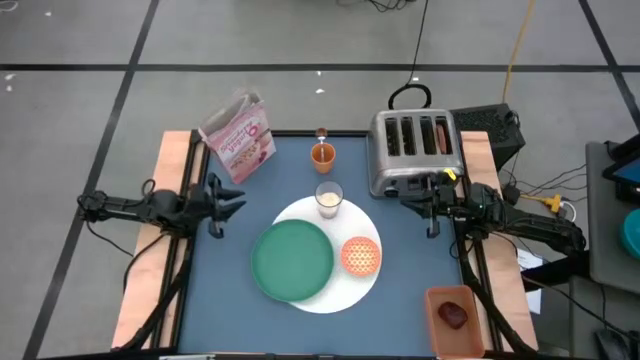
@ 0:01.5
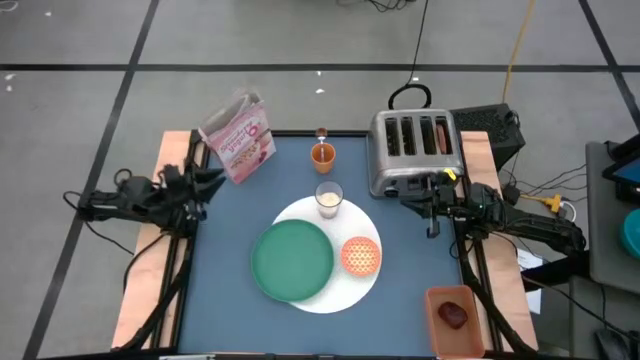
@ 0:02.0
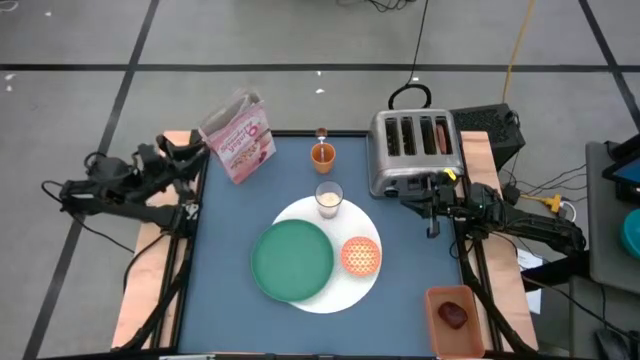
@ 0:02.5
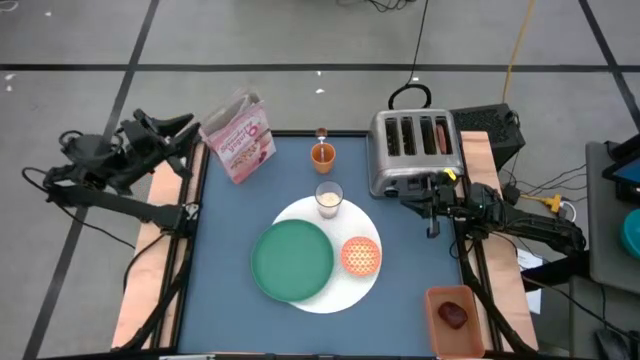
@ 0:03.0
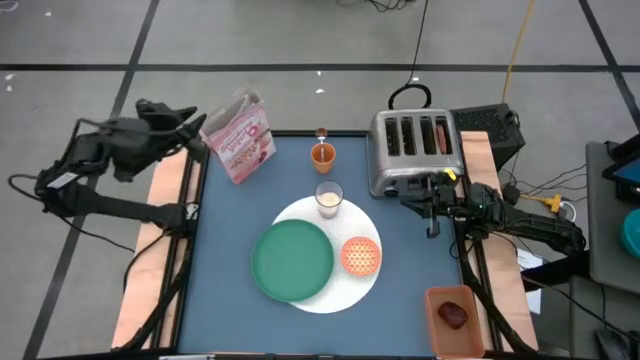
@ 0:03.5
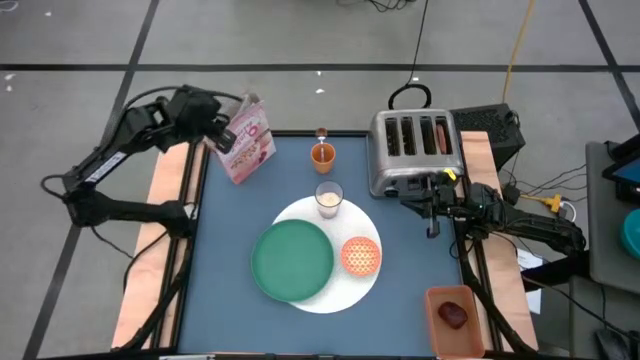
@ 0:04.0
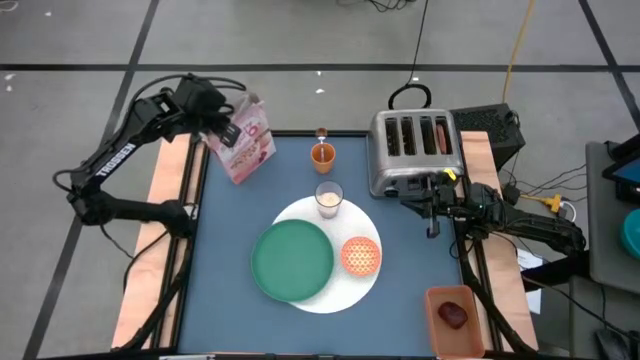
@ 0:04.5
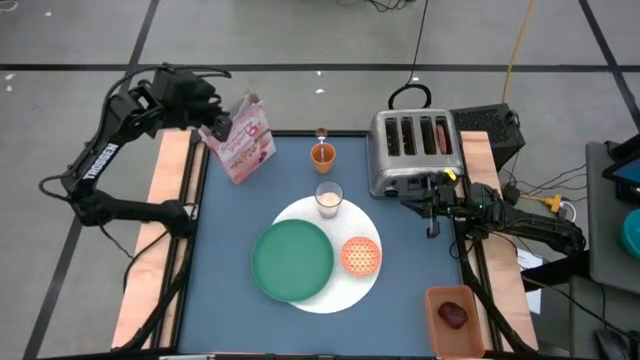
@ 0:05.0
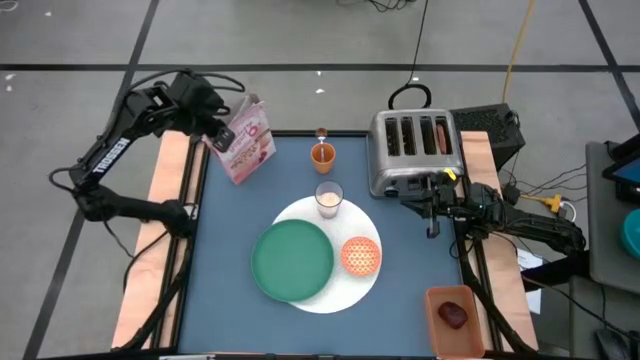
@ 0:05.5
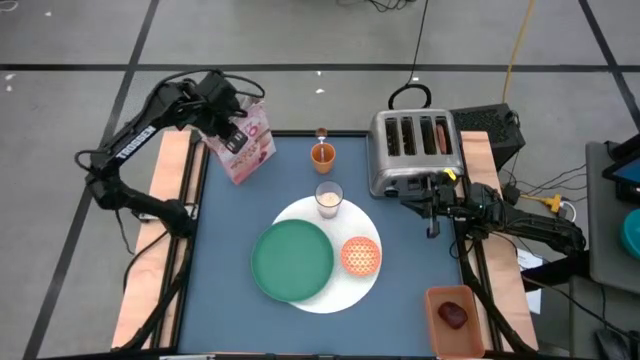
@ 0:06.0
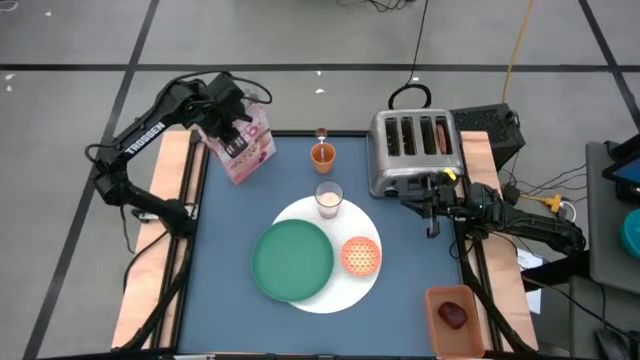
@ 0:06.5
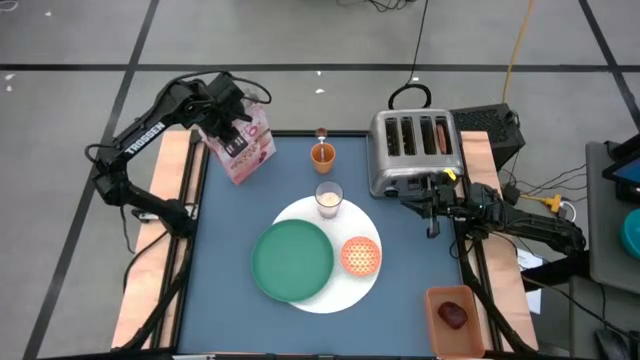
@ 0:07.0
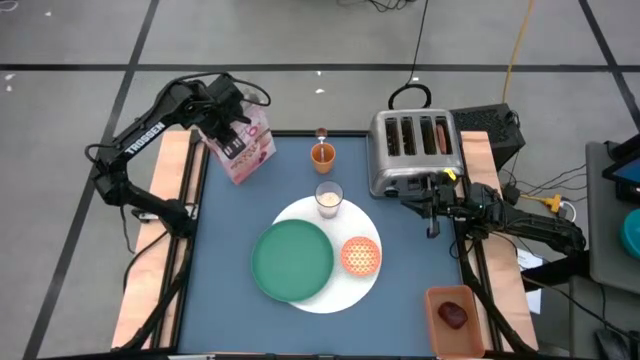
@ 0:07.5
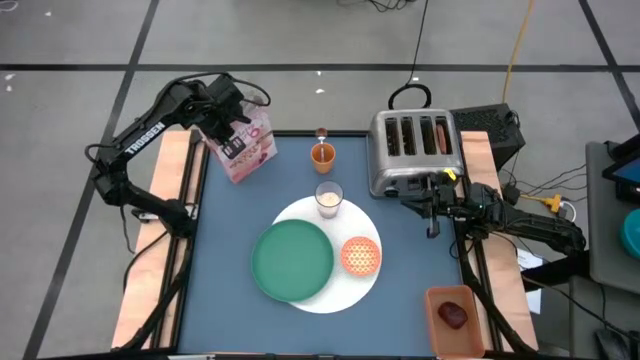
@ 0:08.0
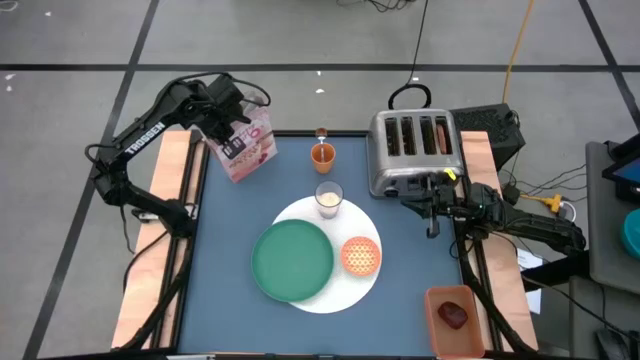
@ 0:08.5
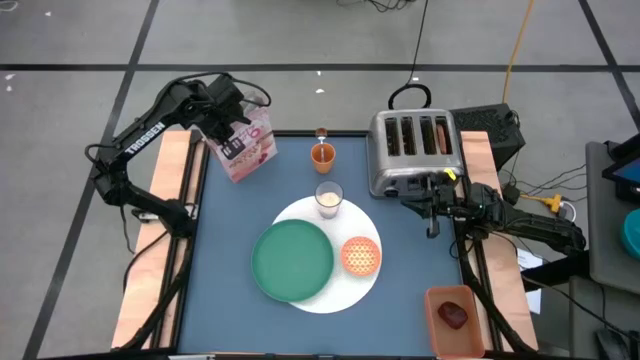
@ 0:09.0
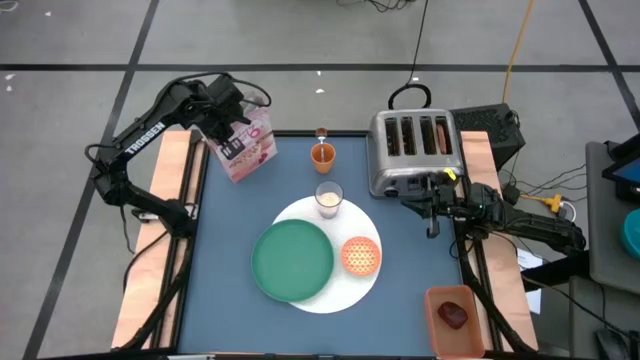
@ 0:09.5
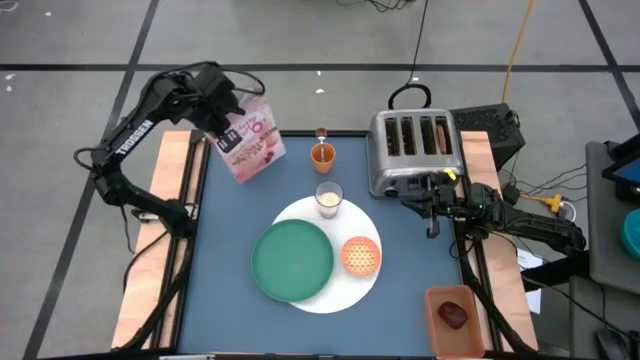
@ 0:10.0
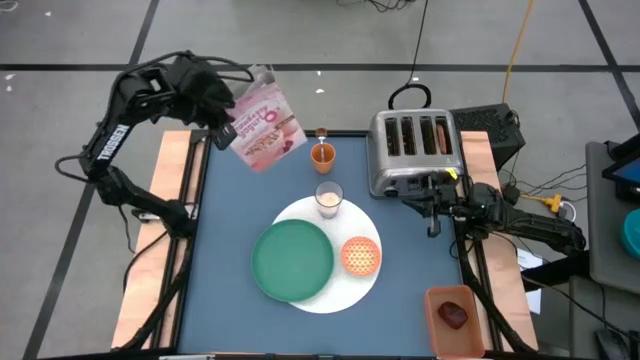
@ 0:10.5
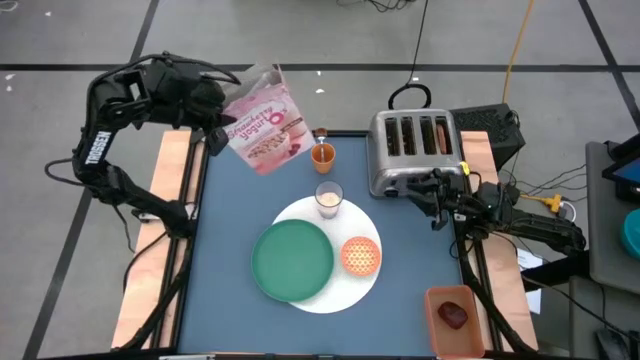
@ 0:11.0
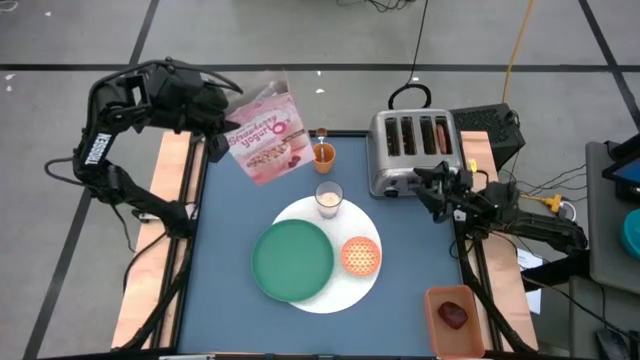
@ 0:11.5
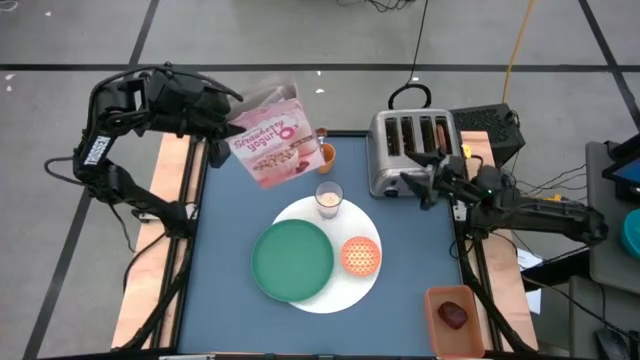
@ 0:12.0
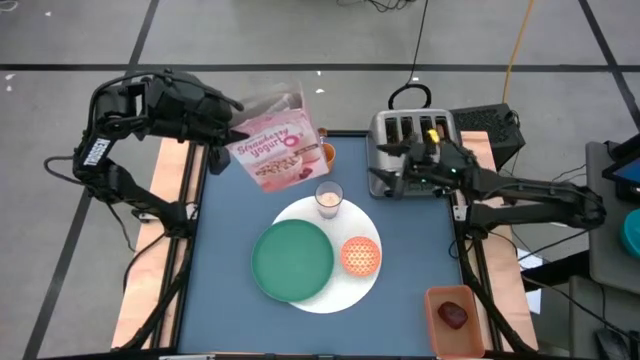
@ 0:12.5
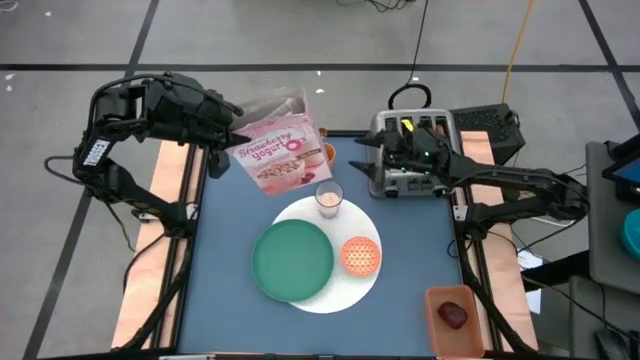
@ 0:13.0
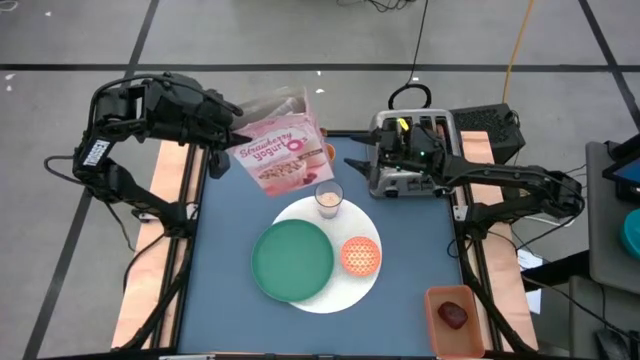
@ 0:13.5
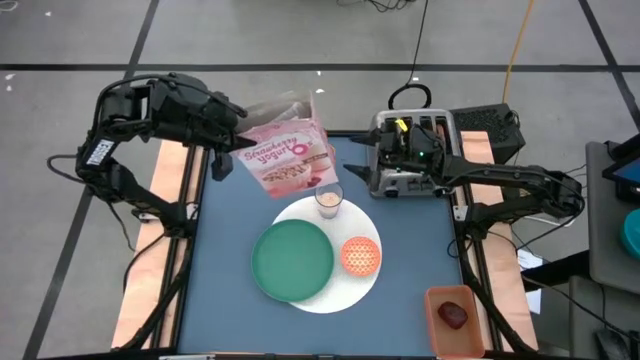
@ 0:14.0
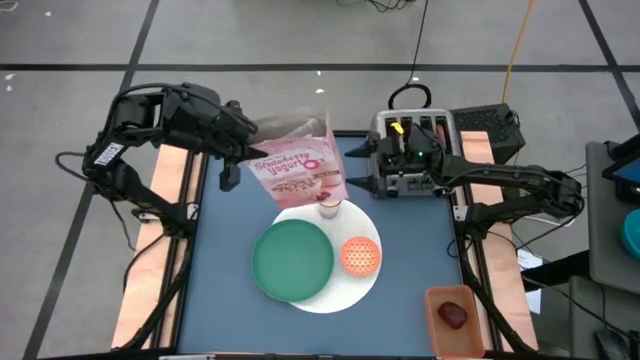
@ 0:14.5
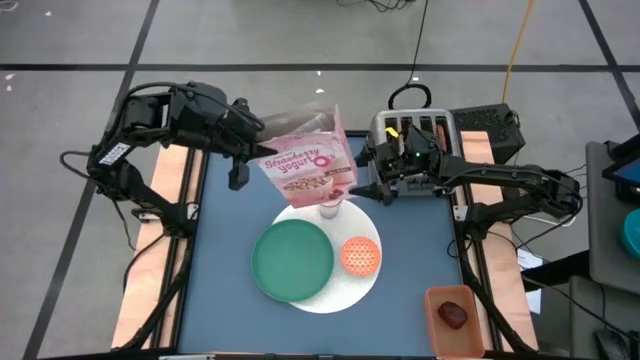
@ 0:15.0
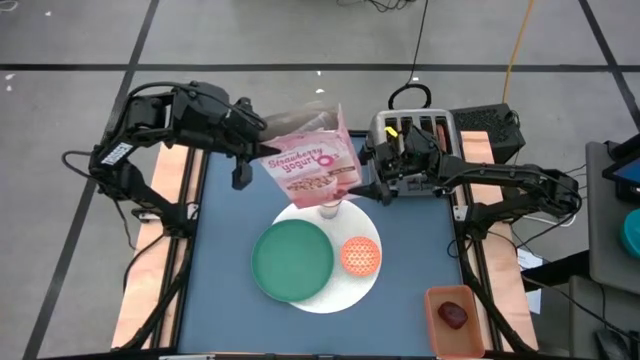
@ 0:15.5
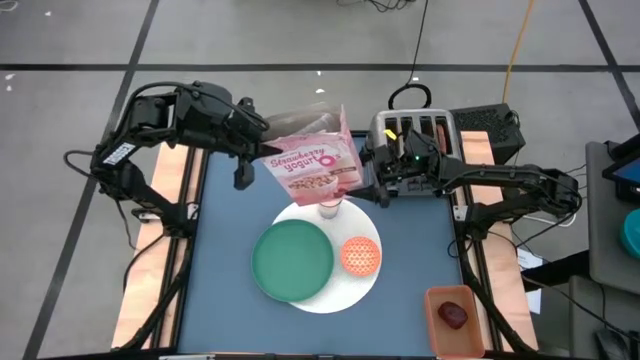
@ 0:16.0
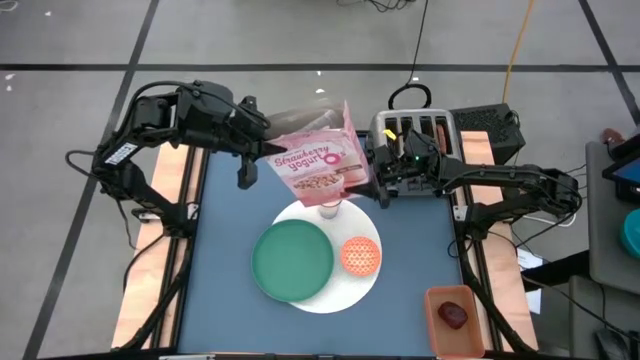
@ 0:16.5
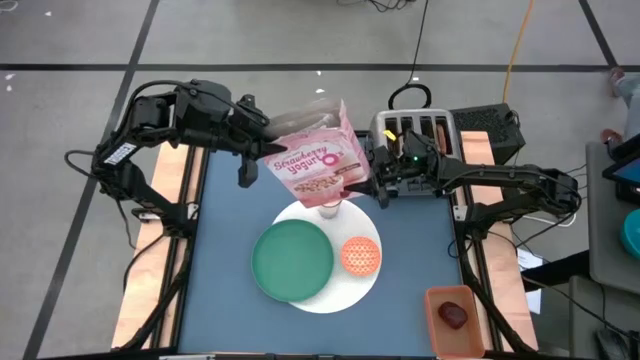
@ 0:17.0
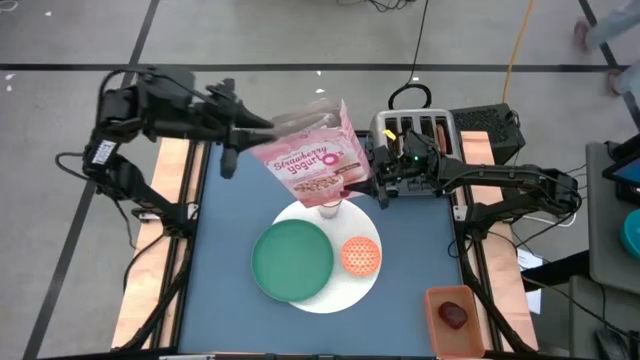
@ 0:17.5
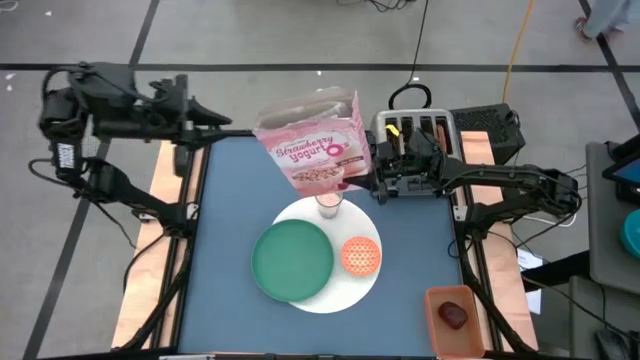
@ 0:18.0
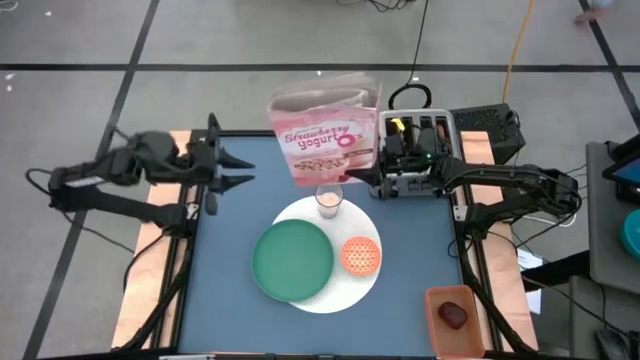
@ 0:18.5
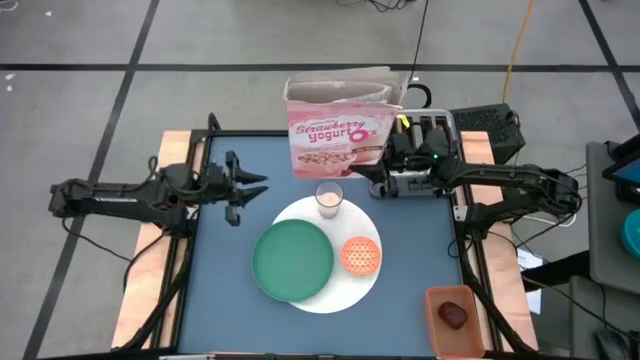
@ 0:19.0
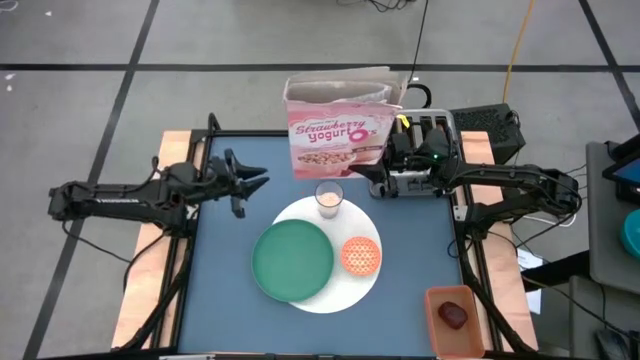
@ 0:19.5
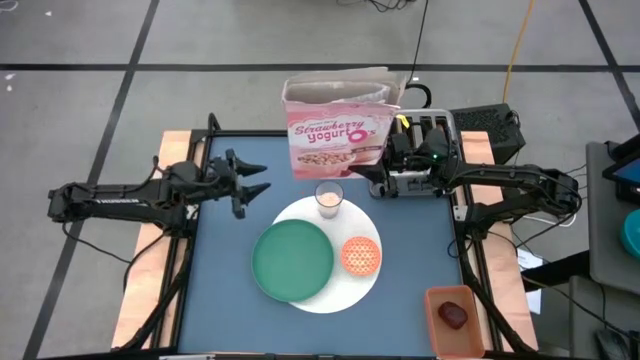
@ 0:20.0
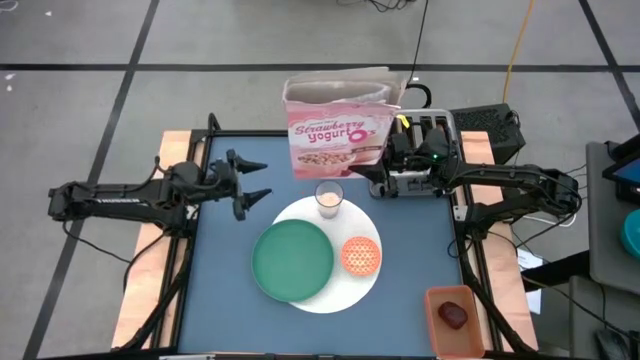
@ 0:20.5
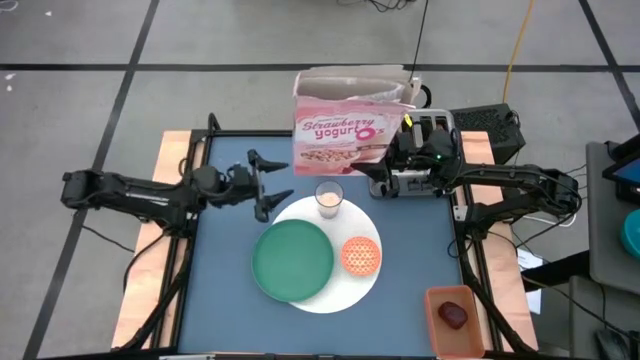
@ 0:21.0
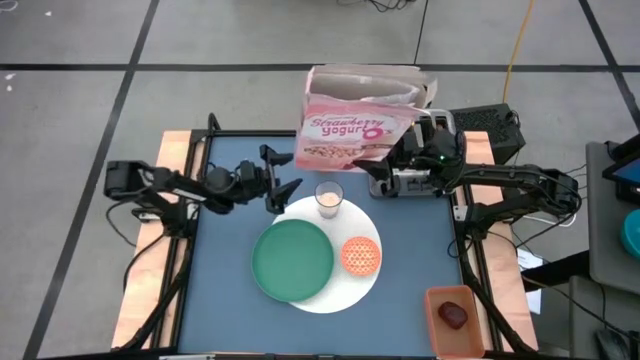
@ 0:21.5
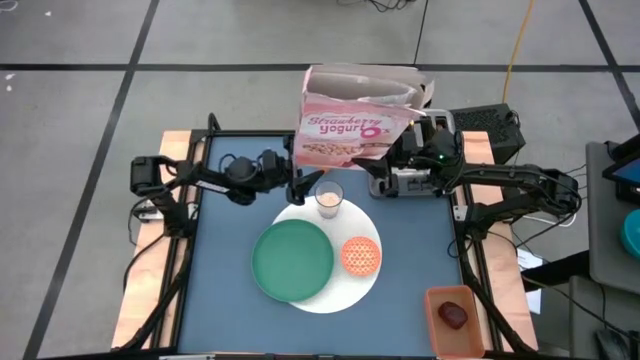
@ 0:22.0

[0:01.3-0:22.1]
Task: Arrange a breakfast setting
Pour the cereals from the cereal box into the orange bowl
